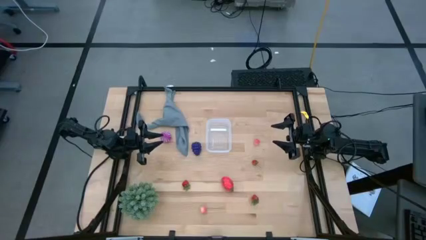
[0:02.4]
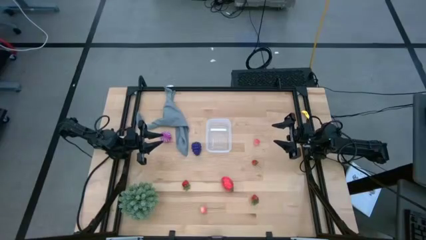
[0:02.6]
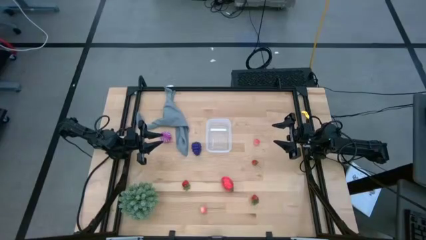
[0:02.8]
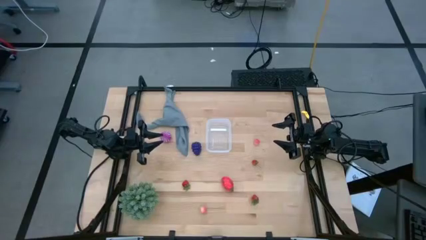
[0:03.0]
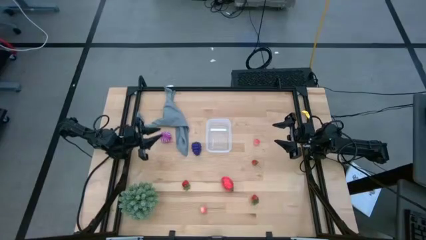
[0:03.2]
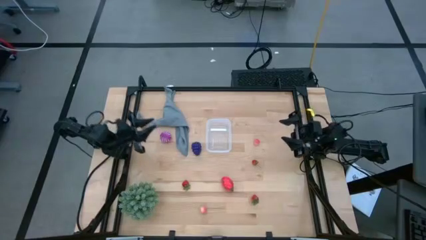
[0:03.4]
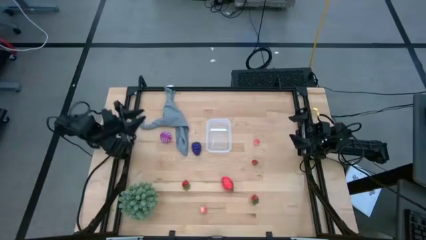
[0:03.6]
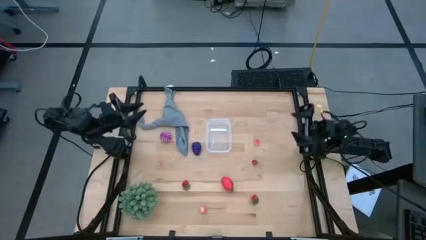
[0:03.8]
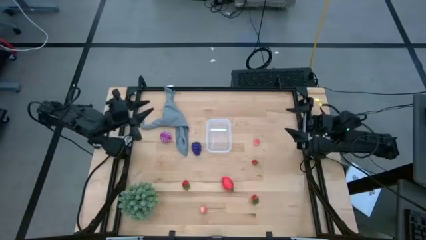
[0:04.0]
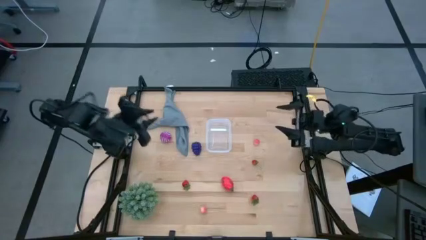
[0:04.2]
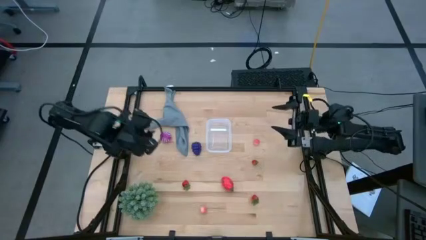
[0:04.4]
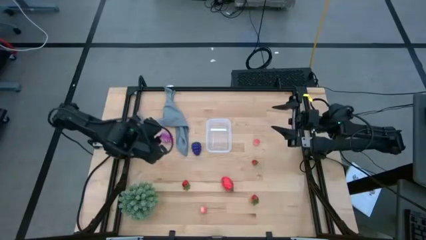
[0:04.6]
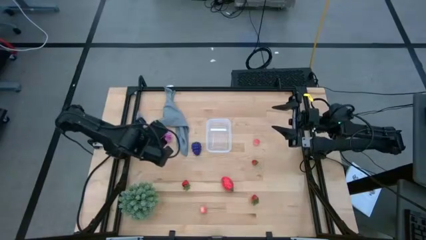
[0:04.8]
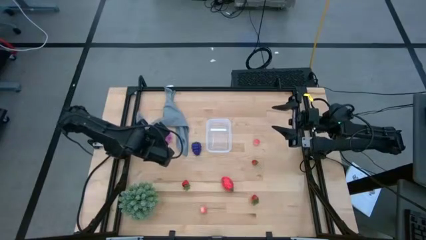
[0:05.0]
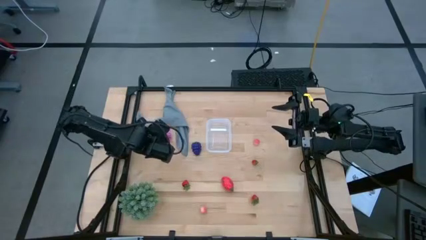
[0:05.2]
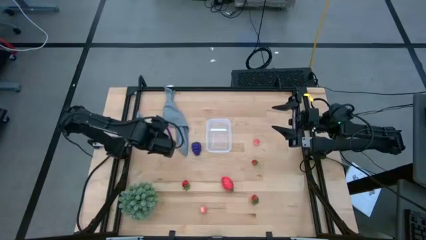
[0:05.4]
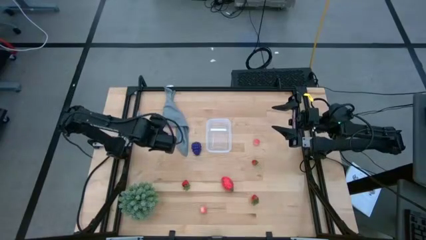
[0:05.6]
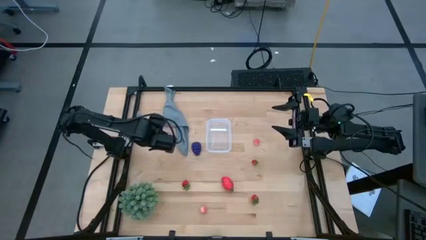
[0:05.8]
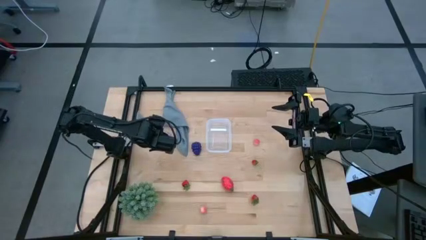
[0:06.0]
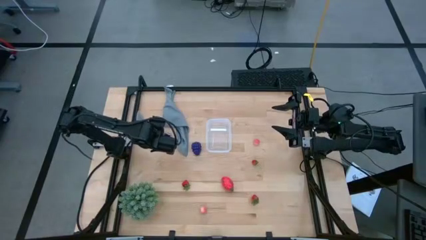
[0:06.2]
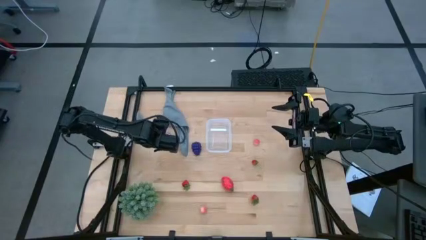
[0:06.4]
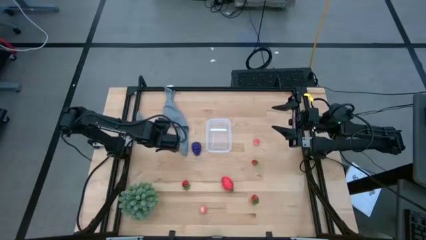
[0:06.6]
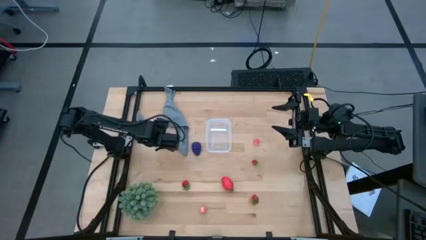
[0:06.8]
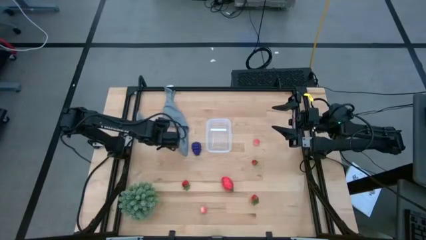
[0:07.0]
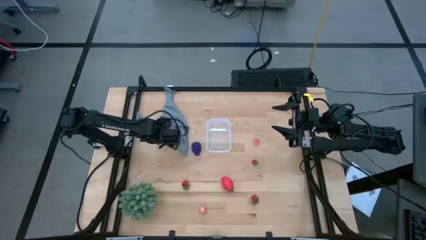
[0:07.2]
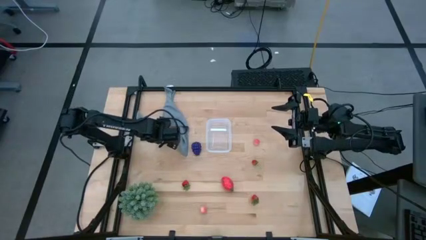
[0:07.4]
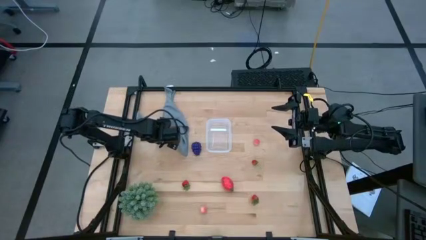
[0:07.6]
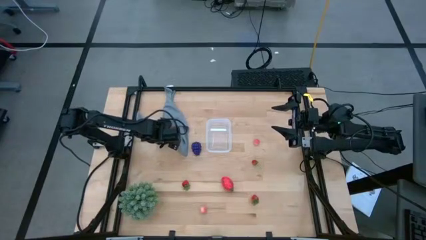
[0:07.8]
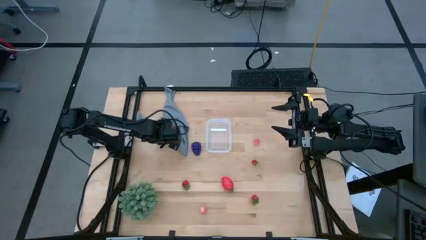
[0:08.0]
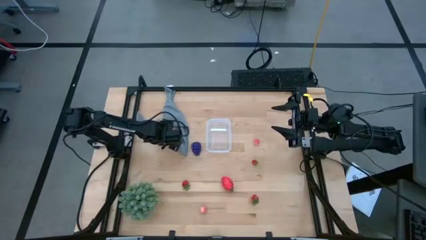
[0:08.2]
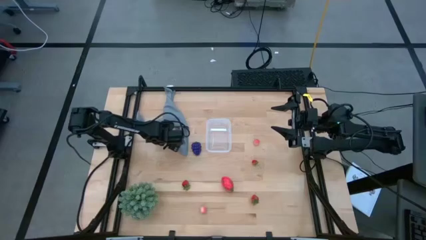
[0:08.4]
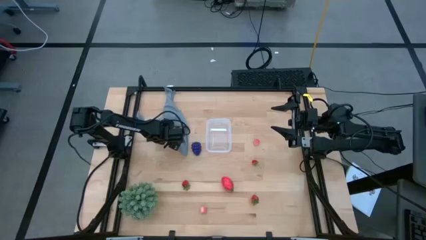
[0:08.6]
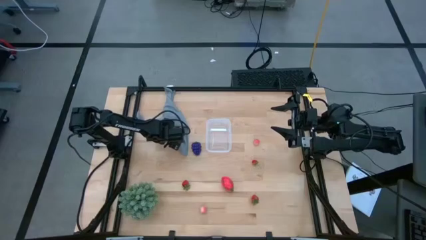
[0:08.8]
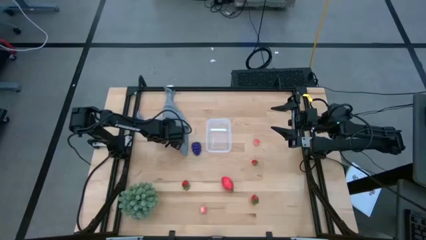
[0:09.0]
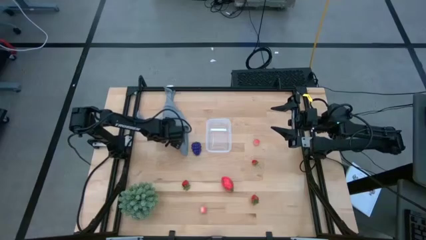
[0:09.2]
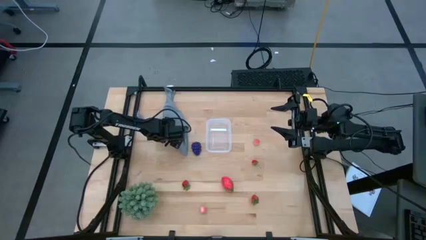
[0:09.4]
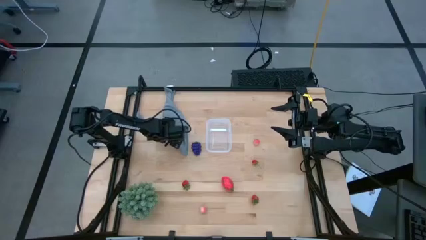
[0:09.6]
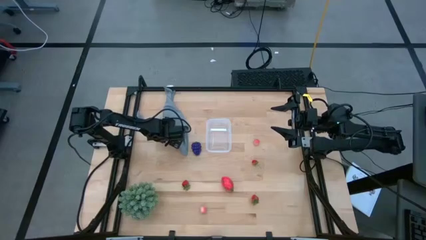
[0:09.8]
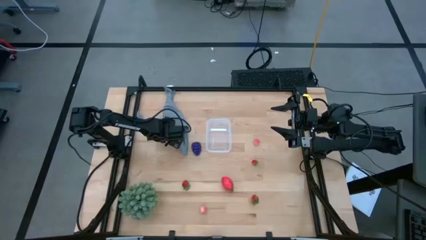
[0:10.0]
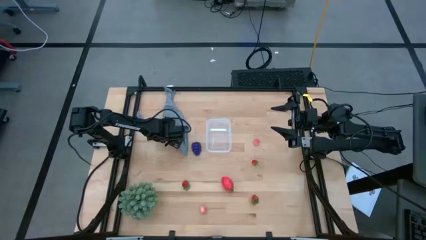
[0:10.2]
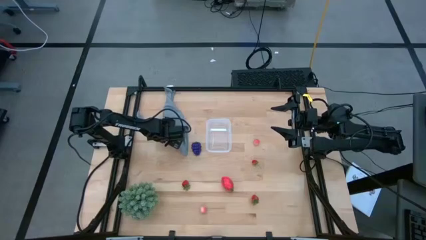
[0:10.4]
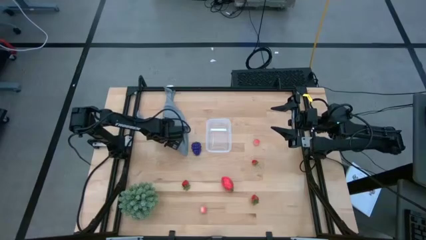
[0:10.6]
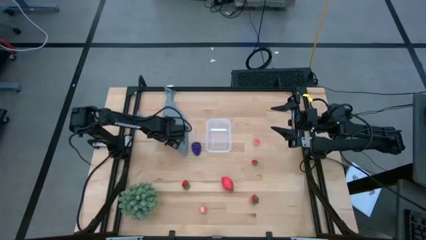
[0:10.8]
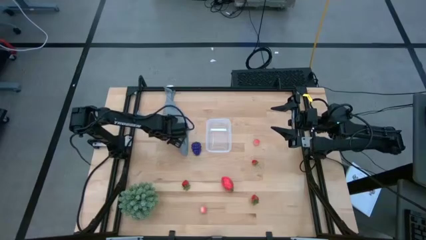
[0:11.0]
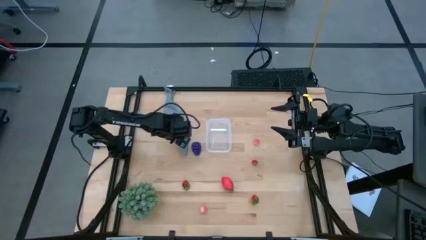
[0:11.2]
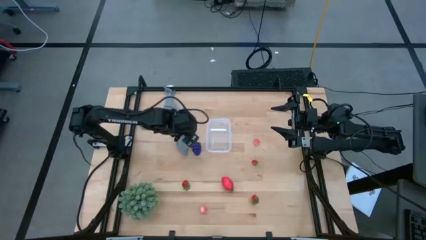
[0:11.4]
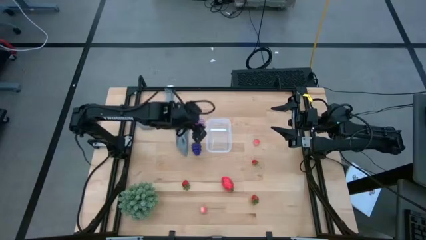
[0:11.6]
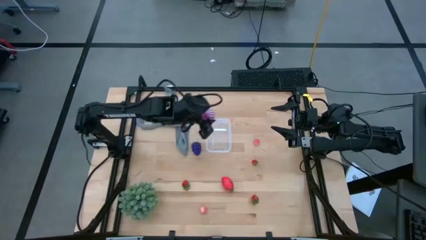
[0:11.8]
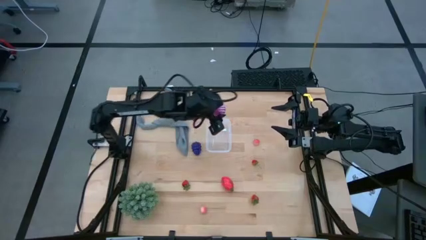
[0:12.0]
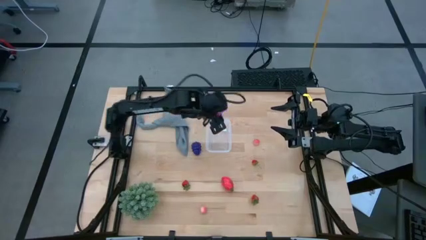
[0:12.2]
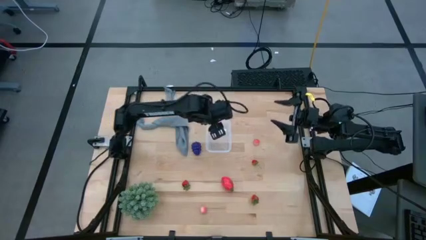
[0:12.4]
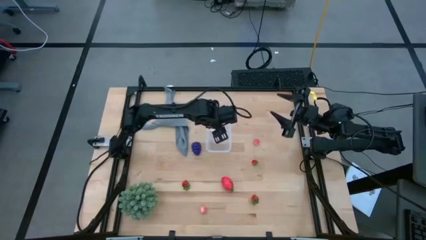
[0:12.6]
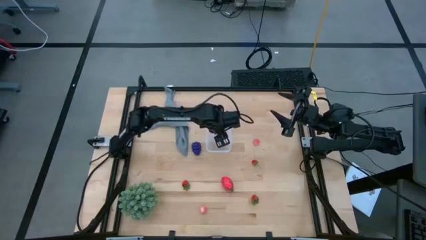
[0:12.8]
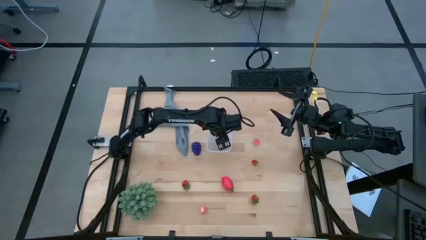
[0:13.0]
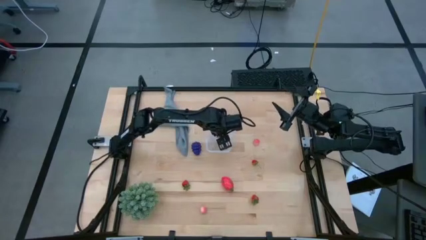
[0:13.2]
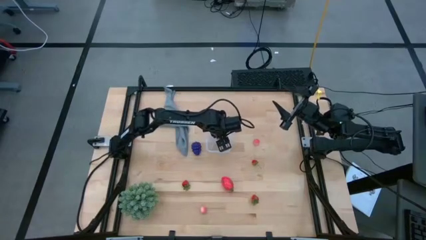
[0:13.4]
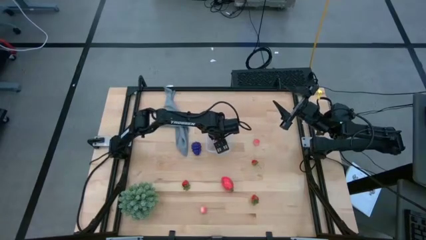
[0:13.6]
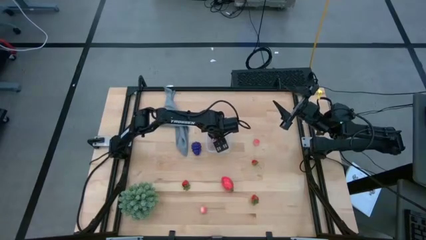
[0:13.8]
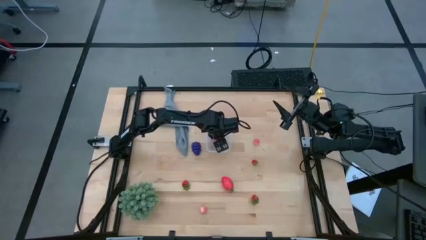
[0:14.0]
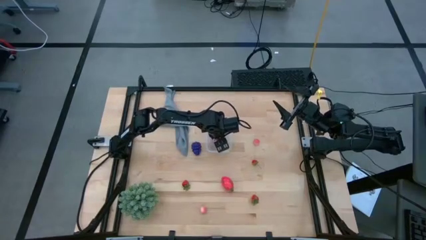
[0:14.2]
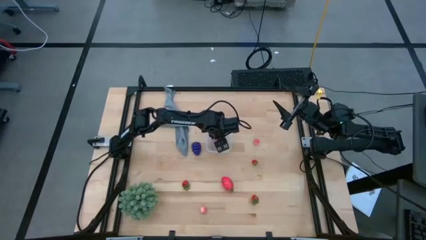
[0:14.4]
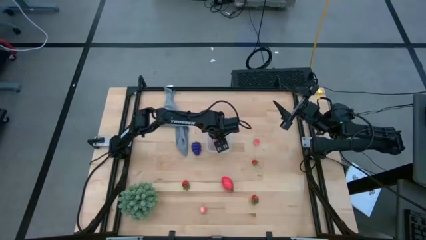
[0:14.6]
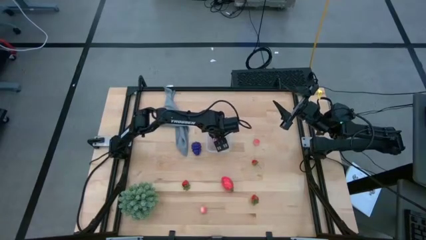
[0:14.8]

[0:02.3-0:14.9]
Task: Pick and placing Produce into tupperware
Put the purple onion into the transparent bin

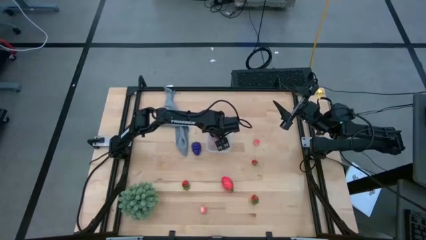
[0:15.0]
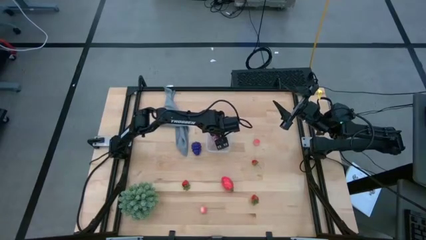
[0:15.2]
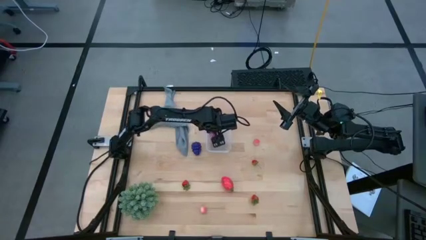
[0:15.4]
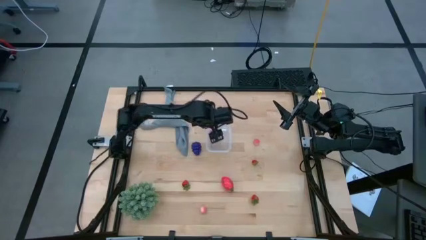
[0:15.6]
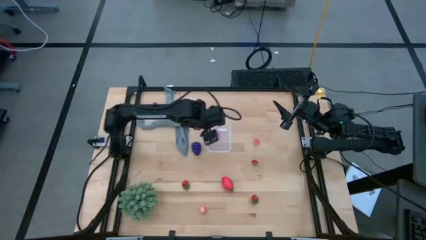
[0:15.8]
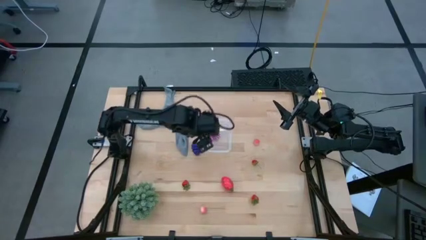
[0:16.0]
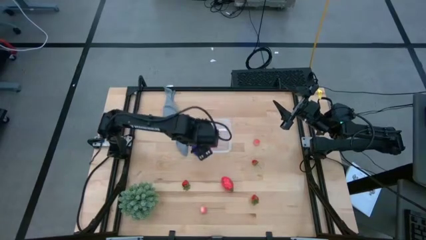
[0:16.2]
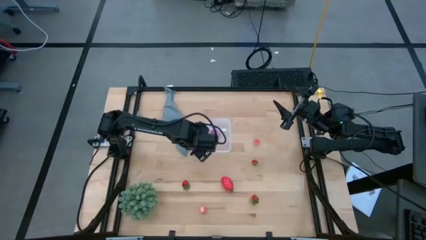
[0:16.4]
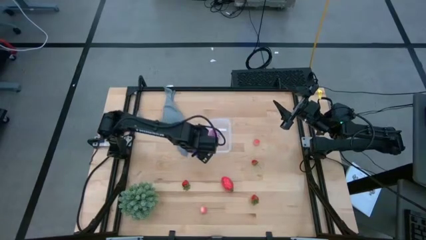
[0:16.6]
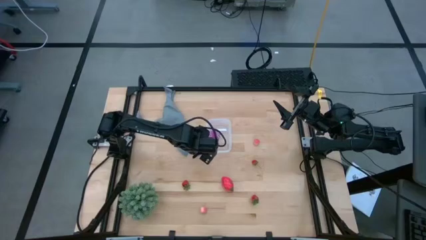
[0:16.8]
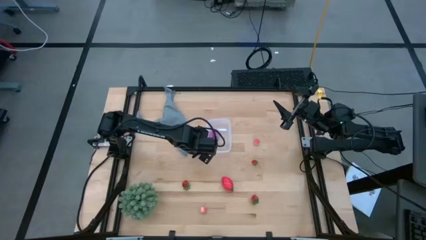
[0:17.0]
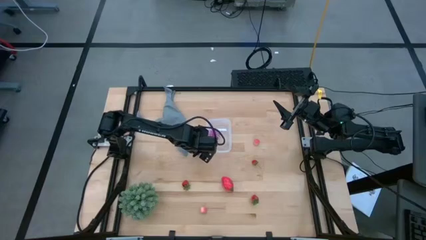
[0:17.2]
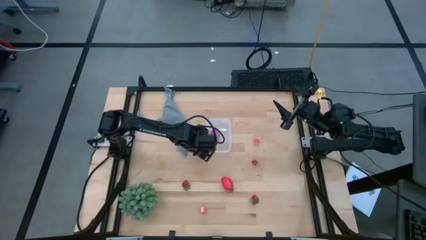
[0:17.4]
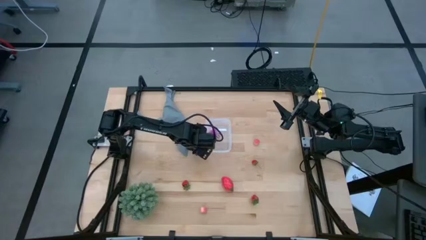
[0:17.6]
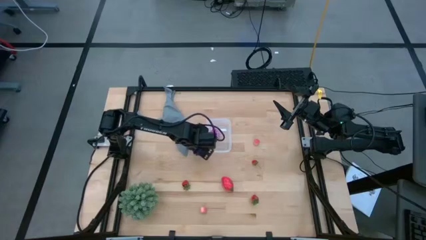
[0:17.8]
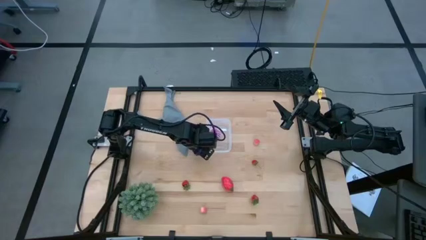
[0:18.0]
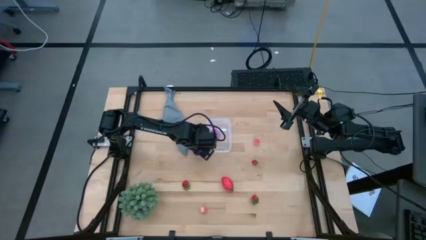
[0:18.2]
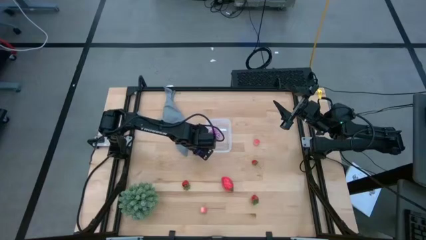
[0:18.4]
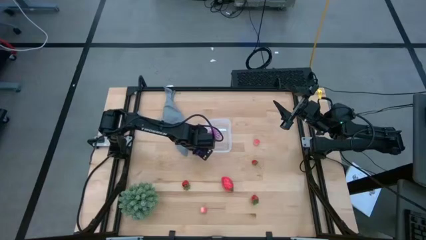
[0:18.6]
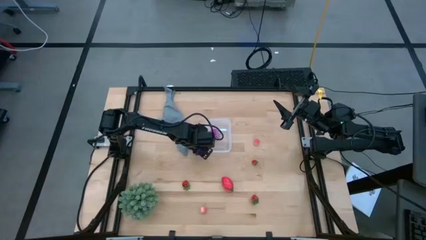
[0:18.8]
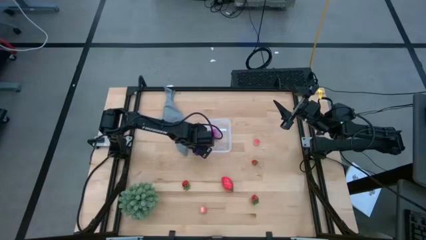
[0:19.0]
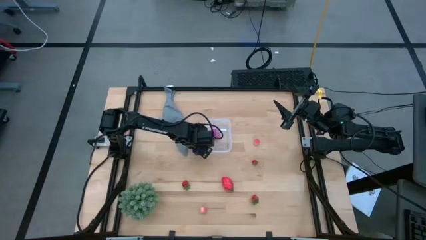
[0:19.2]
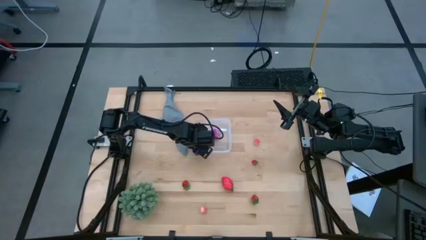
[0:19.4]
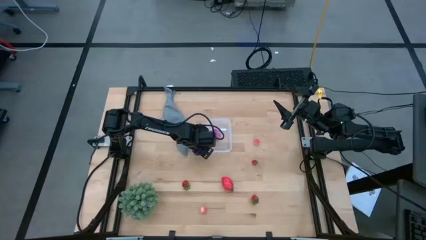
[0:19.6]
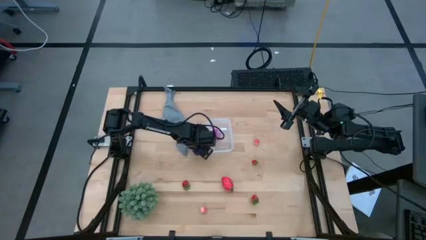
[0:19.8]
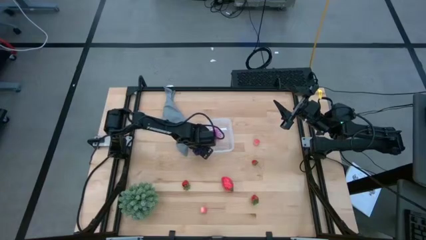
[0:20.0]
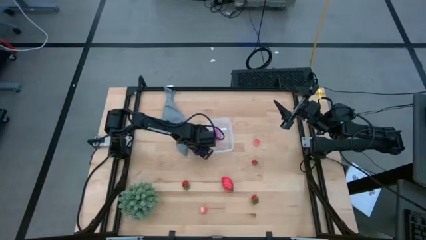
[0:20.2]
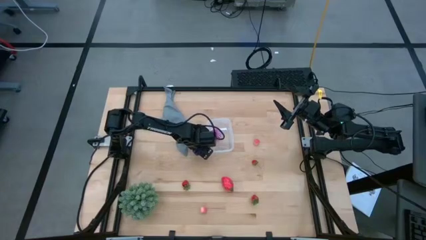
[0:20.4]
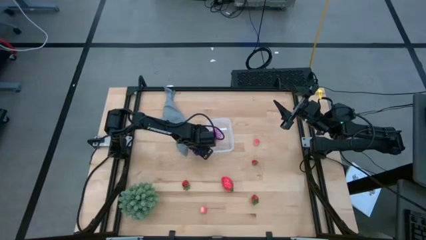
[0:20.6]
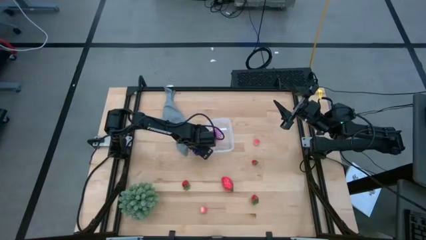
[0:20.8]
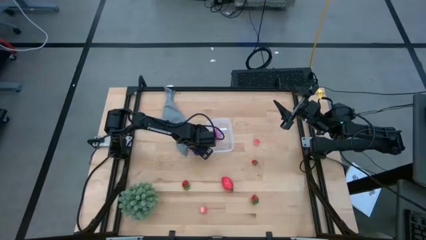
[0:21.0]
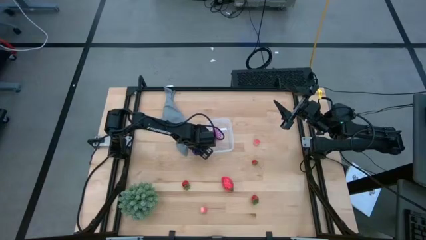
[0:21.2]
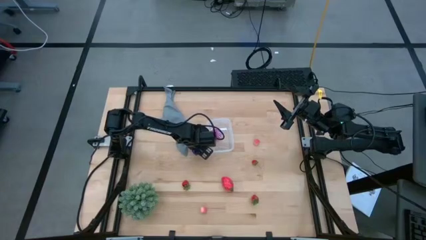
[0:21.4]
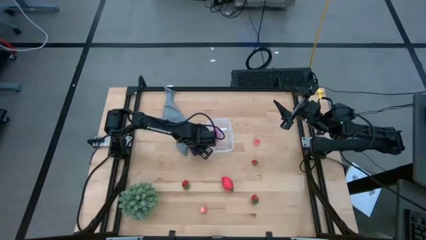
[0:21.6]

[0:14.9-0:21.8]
Put the purple grapes into the transparent bin
